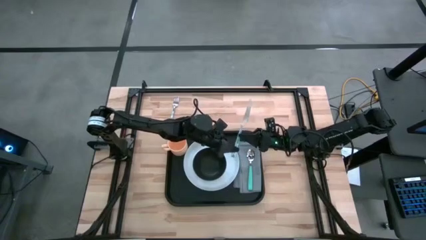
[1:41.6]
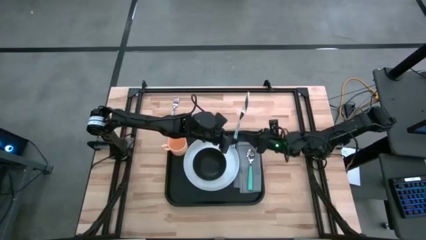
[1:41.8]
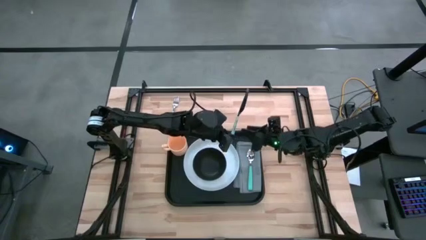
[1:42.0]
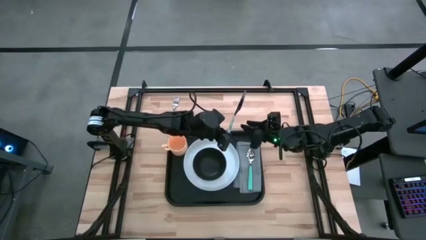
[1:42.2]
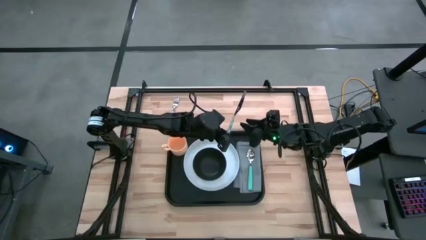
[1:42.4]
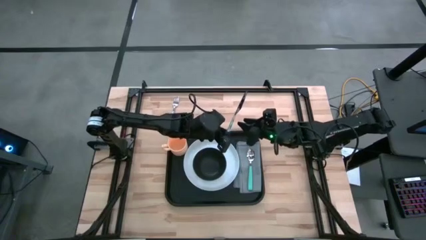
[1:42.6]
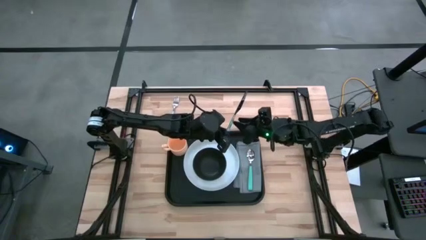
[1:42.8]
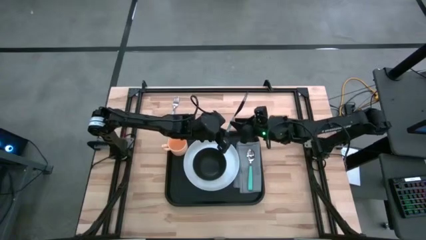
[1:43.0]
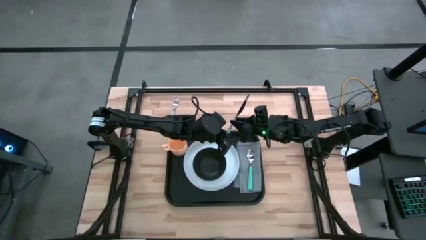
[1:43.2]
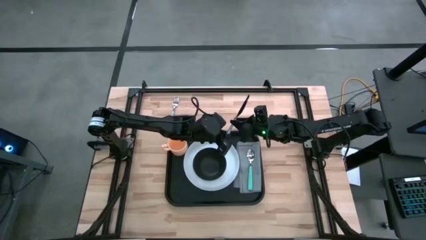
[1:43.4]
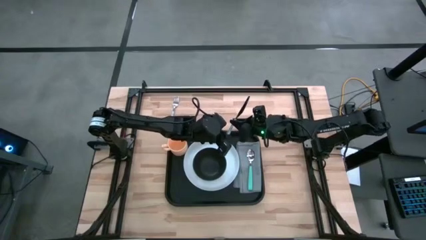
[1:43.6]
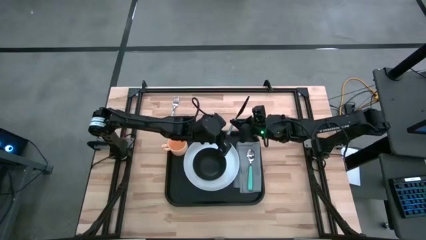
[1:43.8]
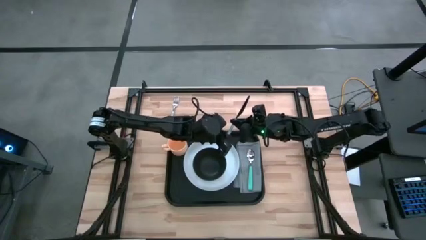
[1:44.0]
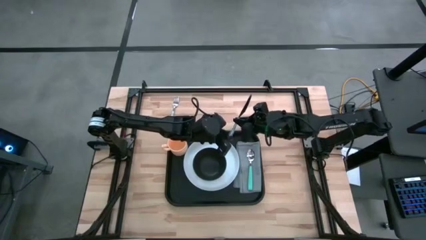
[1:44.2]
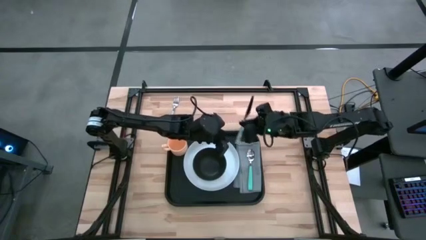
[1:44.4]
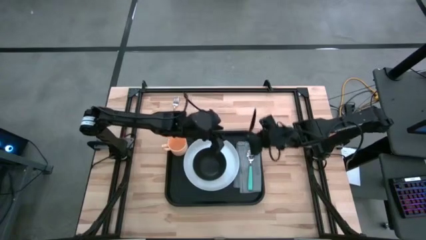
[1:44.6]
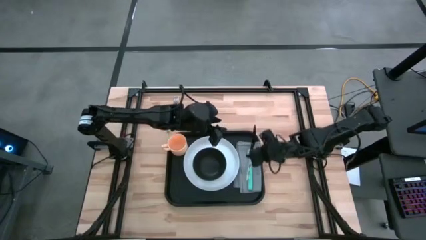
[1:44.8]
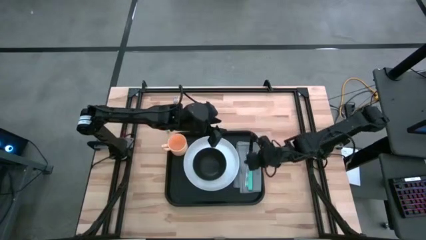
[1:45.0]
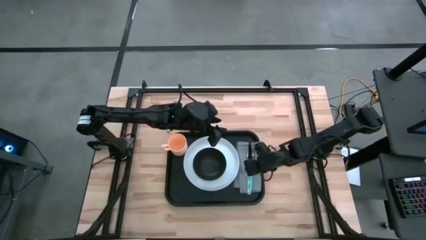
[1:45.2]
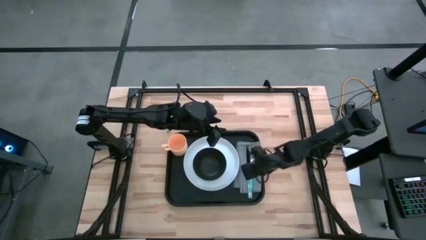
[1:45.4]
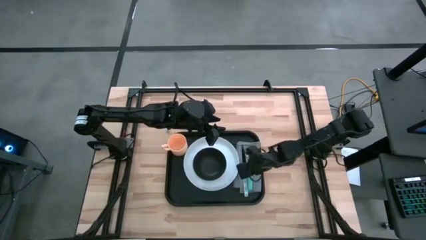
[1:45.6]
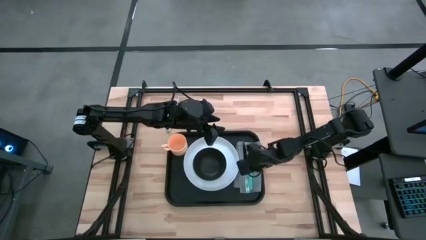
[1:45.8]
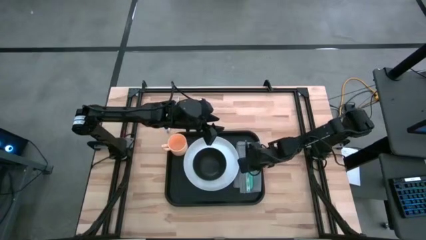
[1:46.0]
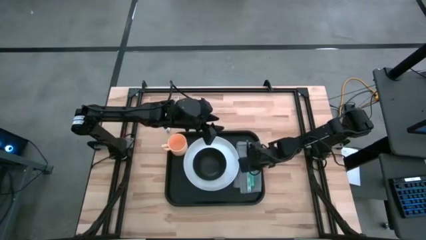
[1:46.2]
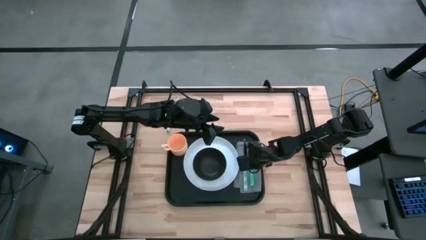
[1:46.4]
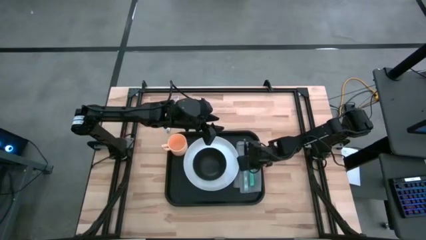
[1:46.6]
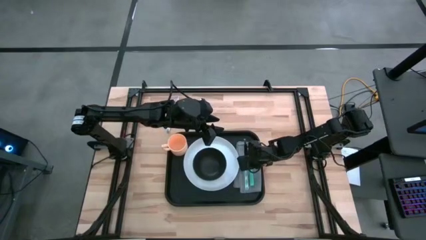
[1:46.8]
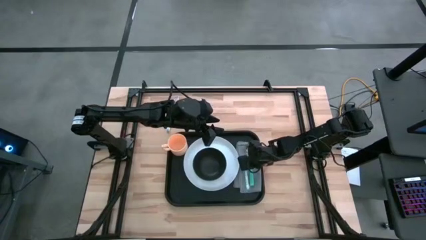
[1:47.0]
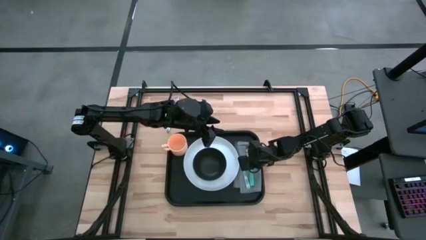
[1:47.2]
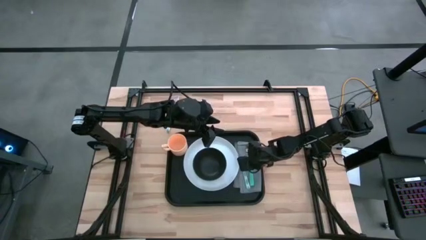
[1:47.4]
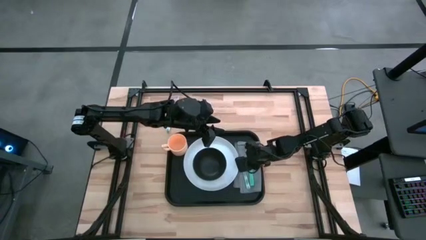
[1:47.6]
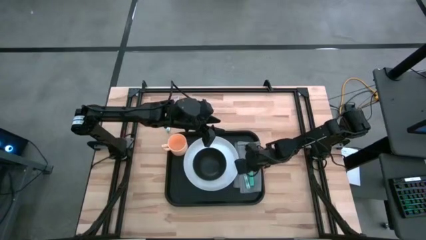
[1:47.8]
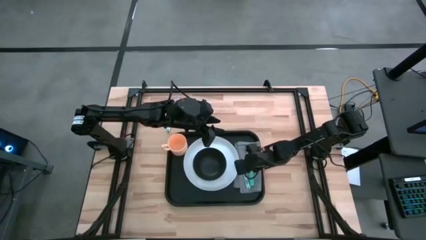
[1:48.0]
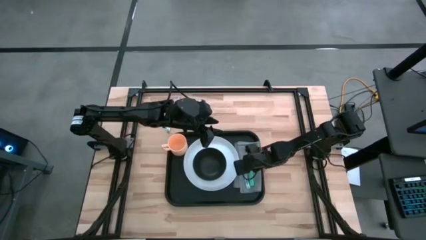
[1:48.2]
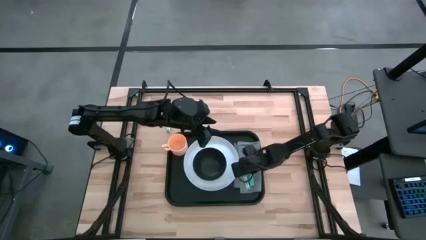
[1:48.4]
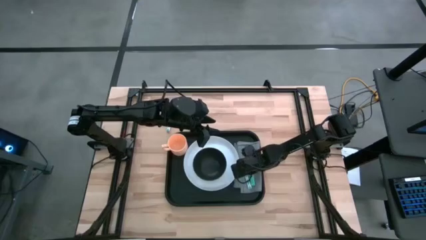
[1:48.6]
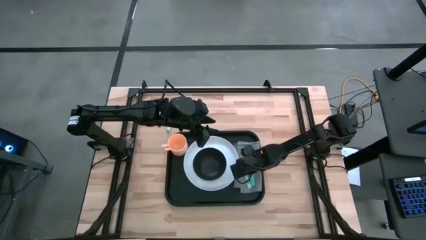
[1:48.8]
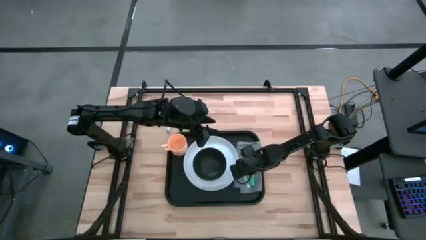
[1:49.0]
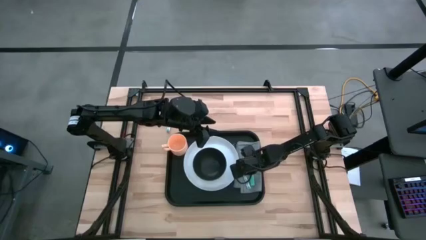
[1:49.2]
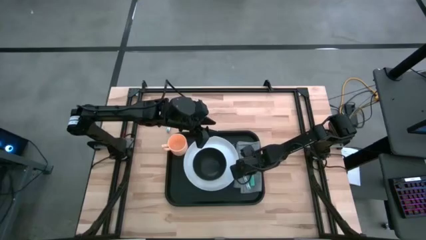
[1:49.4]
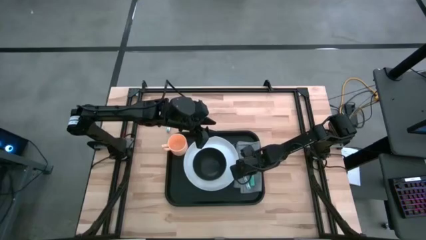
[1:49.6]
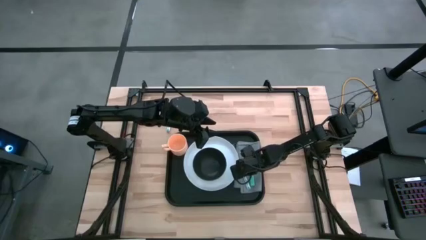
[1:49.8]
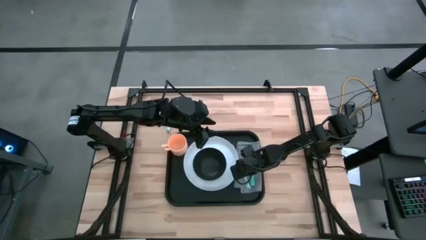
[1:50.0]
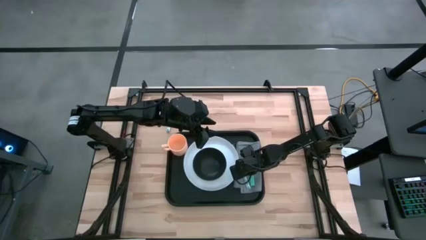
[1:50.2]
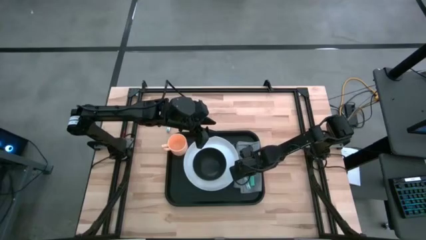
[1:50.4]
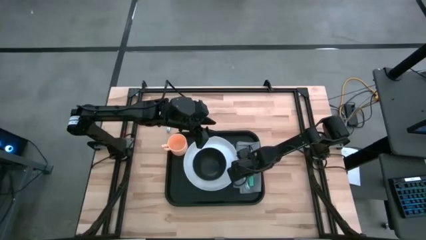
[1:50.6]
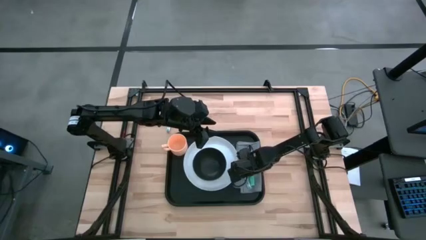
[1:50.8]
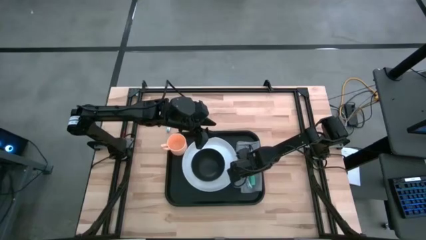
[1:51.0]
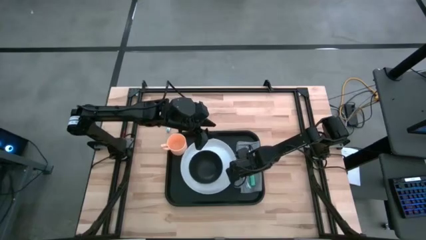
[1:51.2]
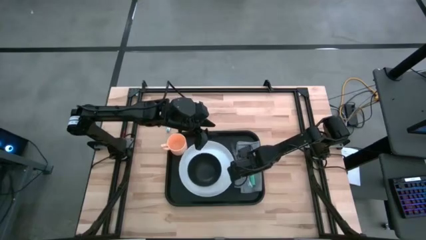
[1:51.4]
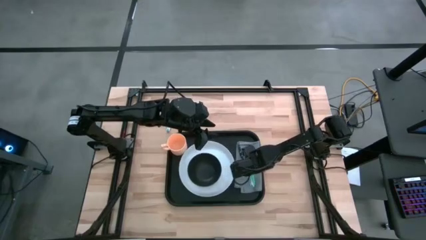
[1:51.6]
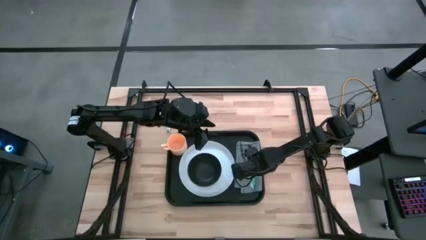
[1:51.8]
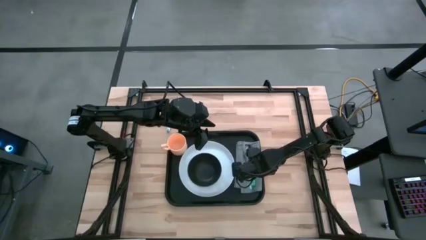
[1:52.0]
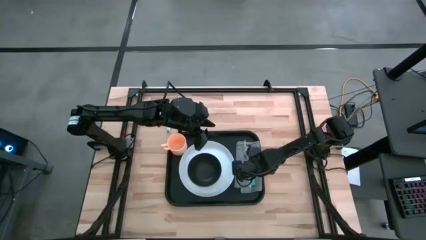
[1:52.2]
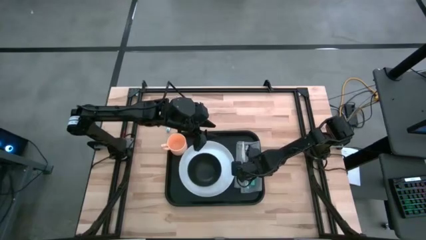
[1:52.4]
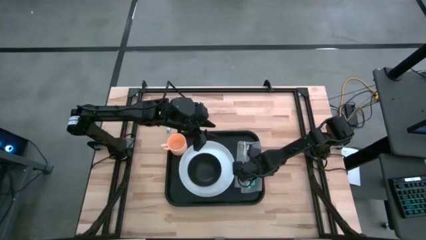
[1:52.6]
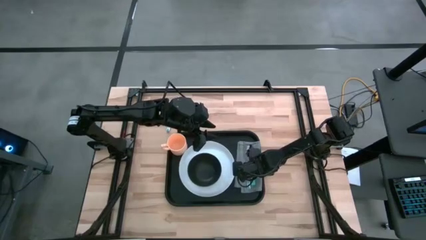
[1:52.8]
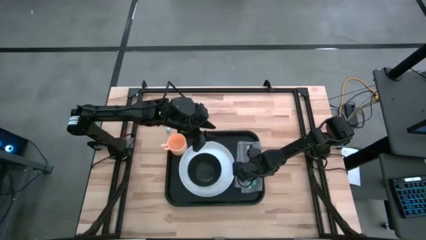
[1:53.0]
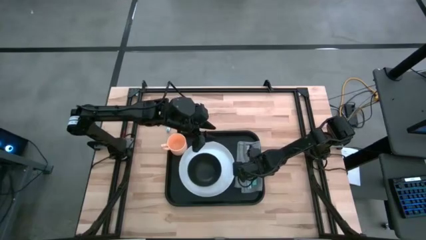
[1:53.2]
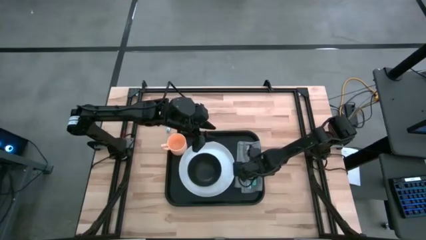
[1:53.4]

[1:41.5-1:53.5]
Task: Set up tray
Put the blue knife on the gray napkin

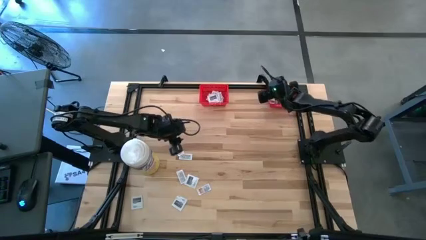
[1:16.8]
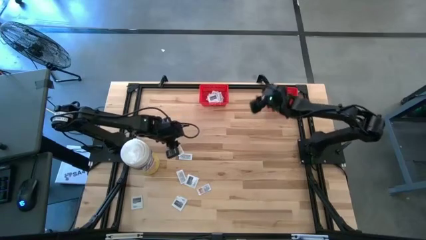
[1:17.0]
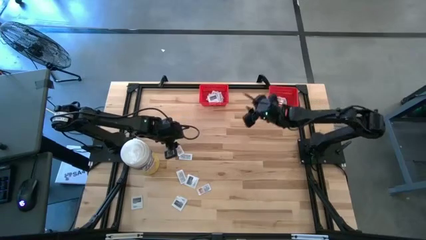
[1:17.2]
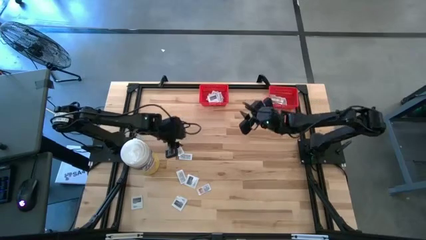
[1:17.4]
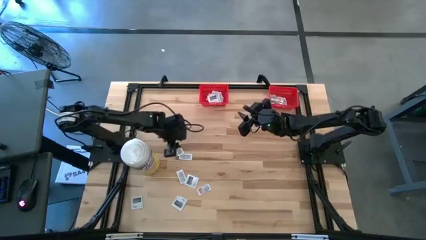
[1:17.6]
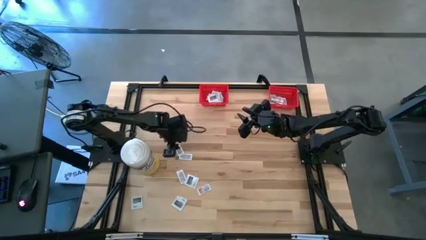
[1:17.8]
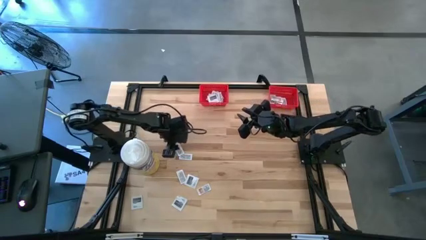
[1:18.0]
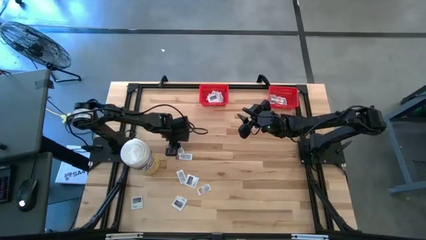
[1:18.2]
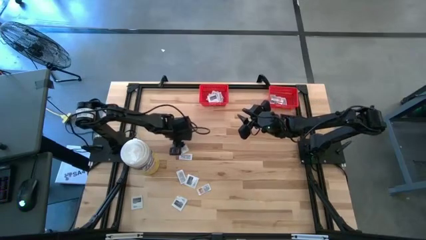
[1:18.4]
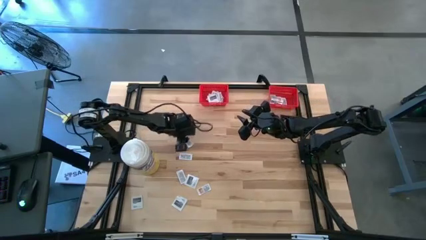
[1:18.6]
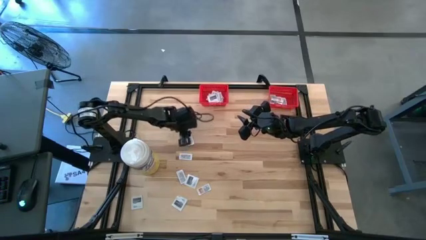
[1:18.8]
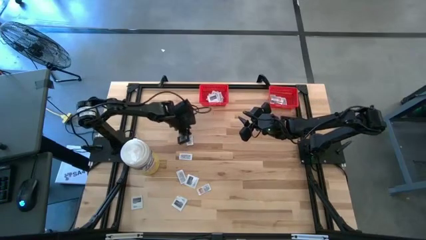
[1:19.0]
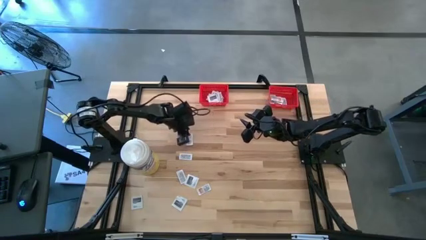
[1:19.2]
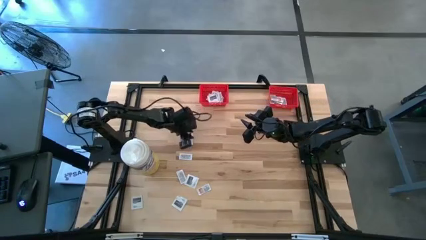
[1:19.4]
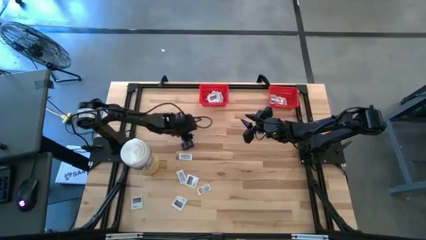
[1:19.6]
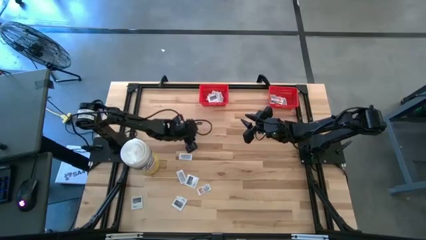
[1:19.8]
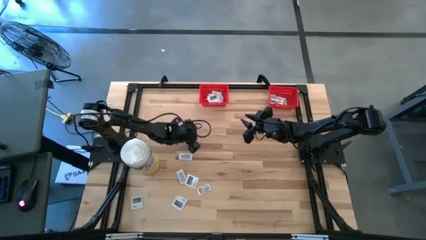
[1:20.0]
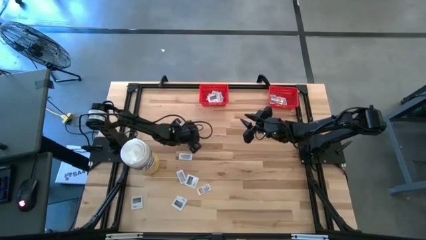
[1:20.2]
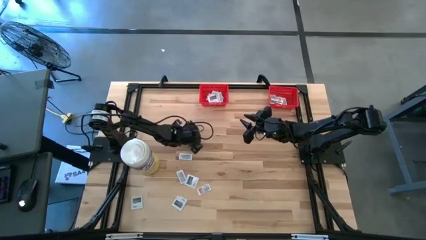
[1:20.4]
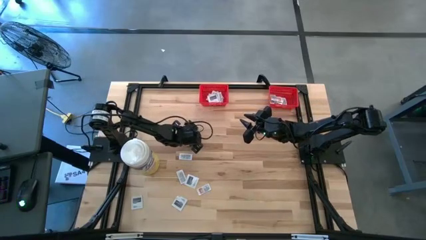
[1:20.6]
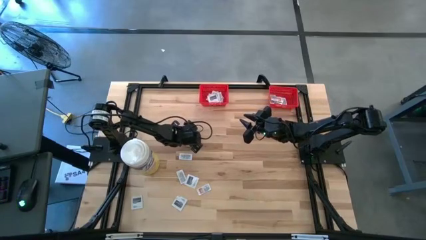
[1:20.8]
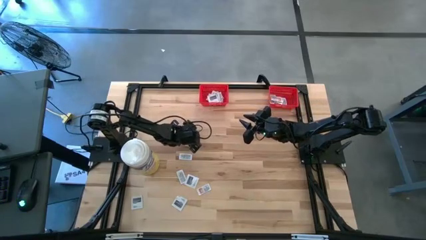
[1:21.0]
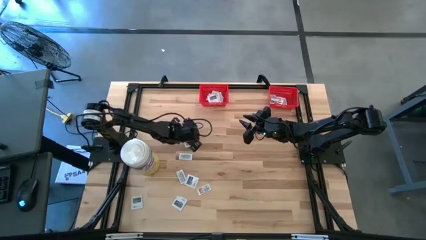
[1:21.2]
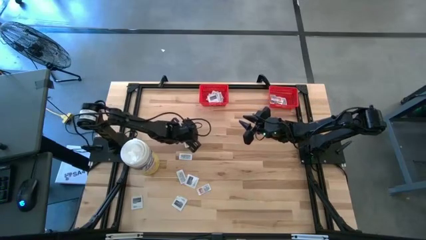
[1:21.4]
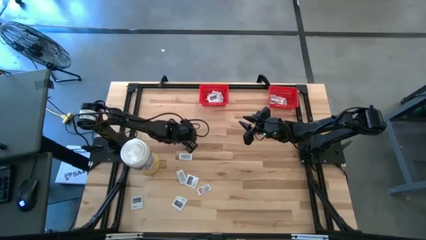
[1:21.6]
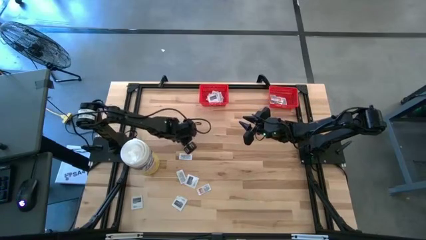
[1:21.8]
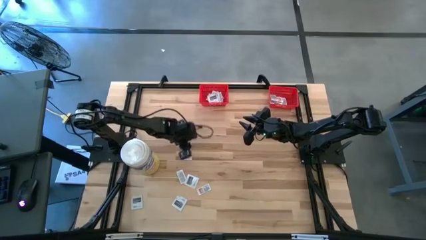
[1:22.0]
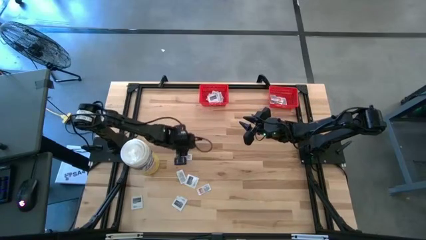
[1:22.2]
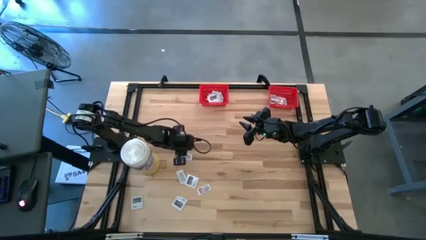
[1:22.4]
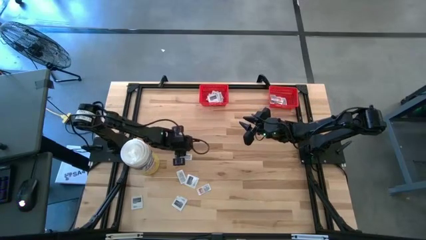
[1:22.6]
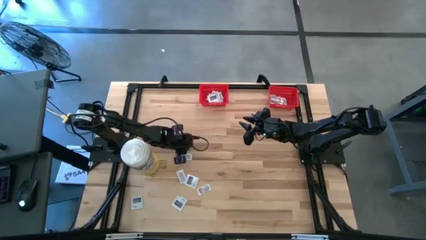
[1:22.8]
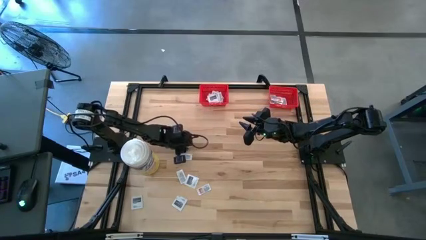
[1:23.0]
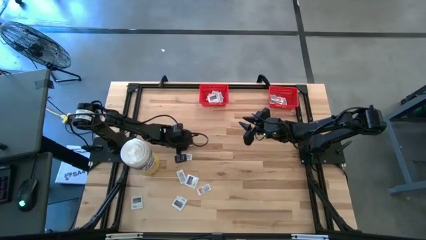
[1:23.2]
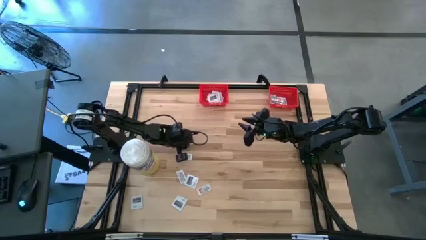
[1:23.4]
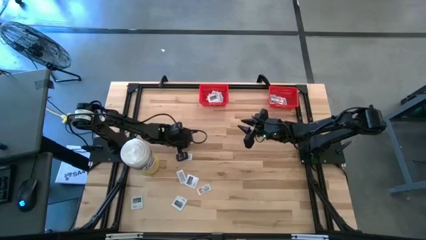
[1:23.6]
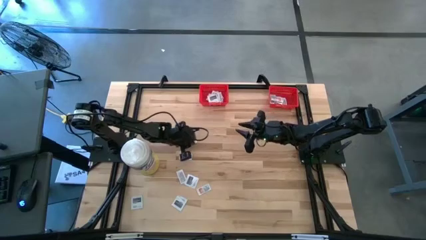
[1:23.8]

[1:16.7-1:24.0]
Task: Pick & Place First Aid Supplies
Put the ointment pack into the right red bin
